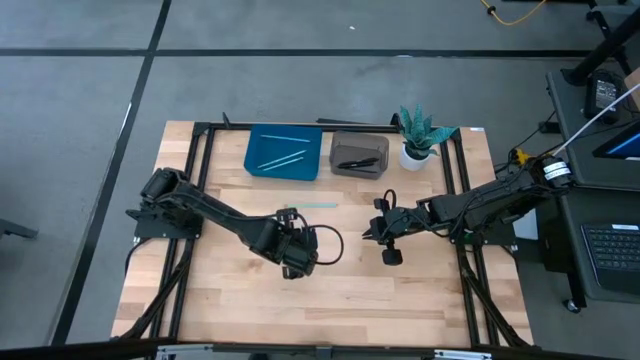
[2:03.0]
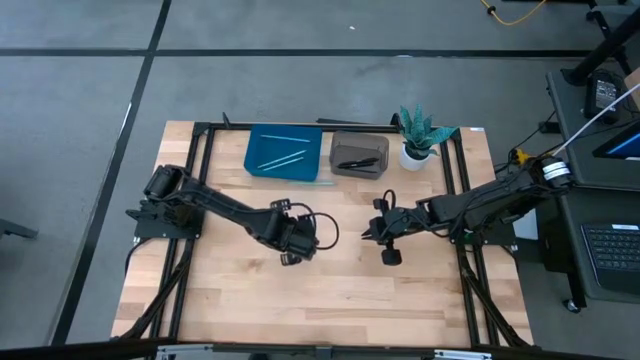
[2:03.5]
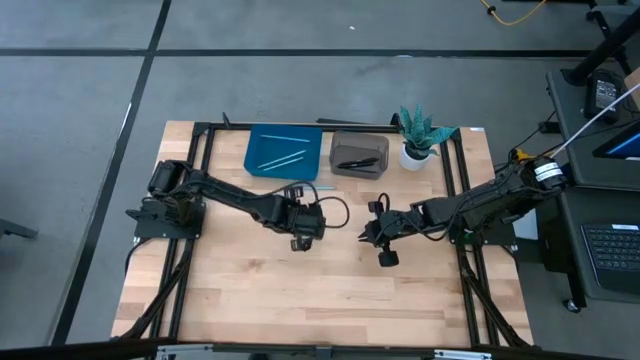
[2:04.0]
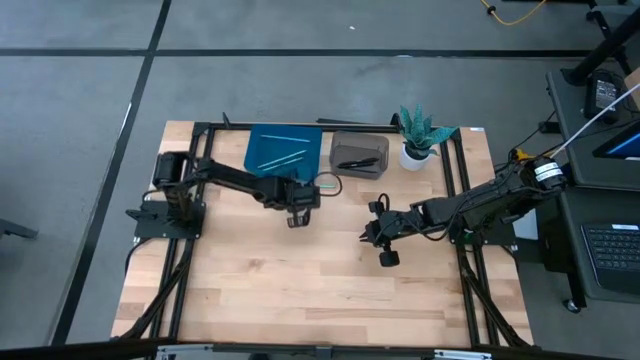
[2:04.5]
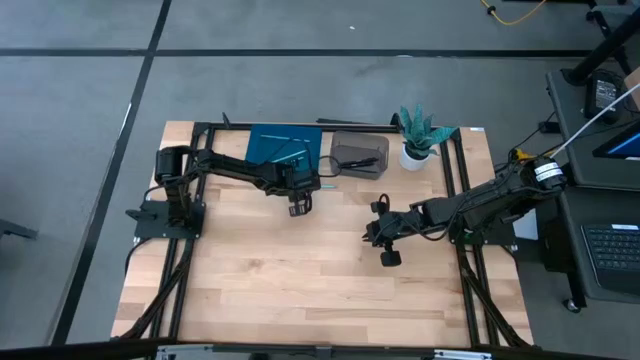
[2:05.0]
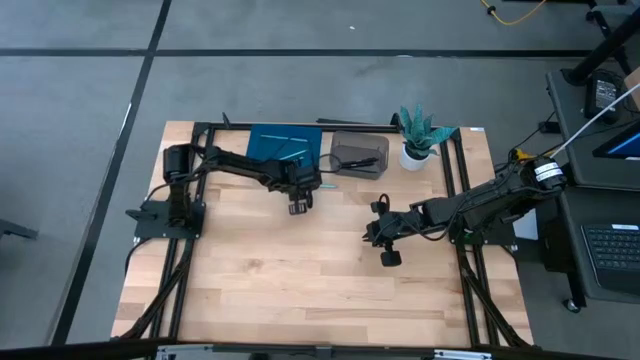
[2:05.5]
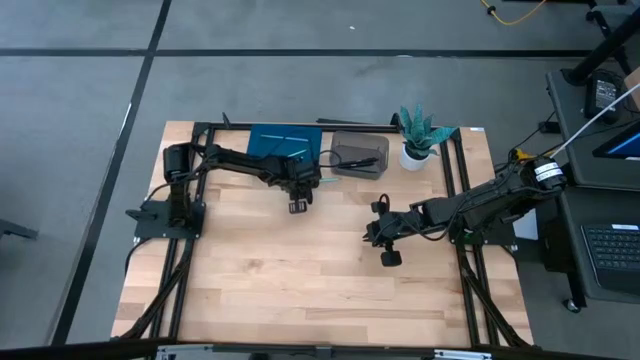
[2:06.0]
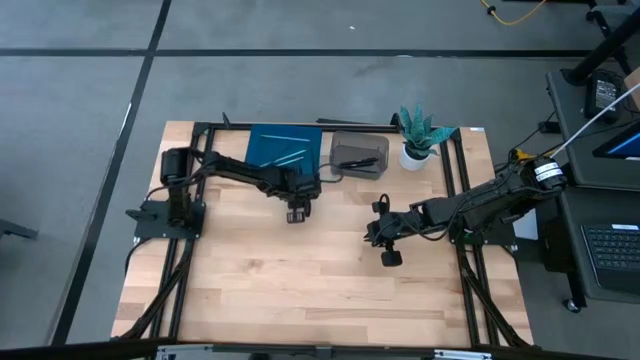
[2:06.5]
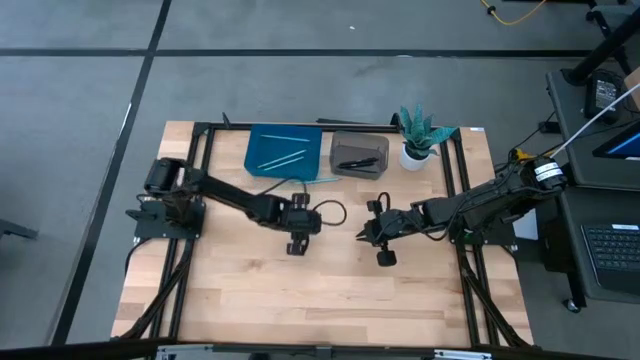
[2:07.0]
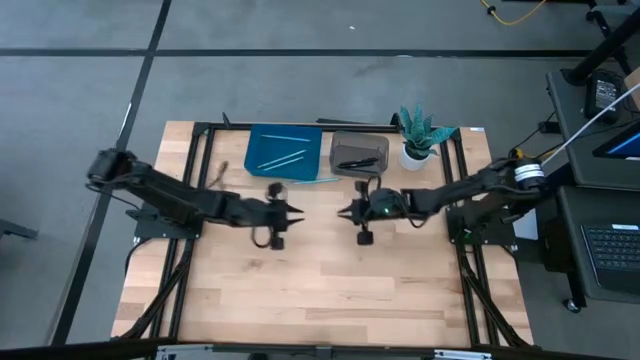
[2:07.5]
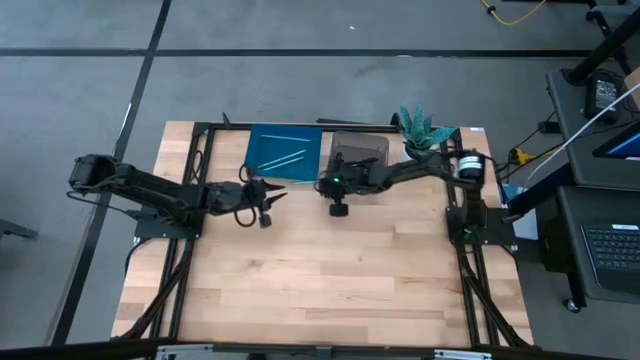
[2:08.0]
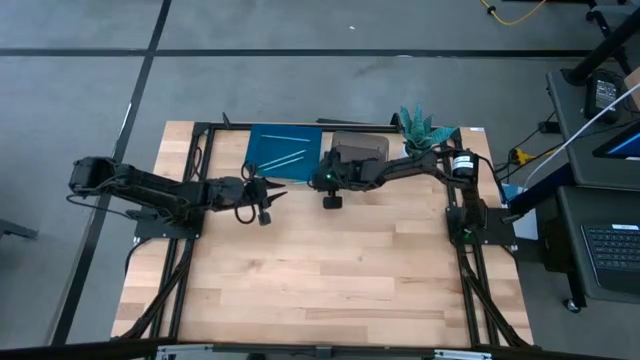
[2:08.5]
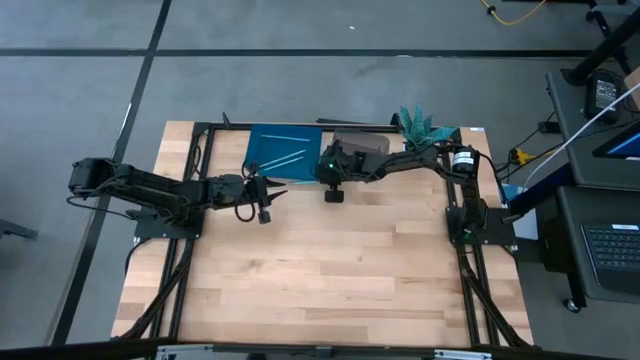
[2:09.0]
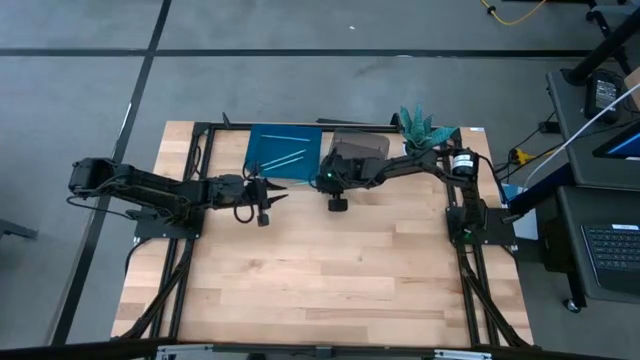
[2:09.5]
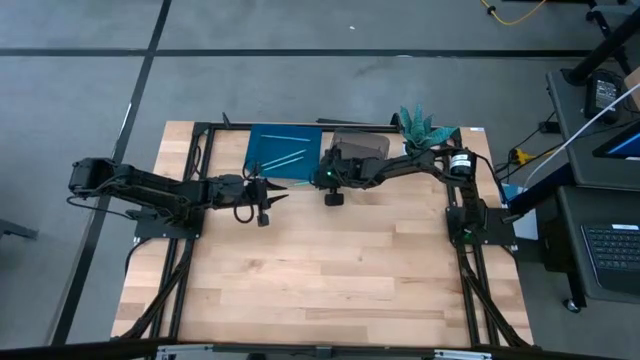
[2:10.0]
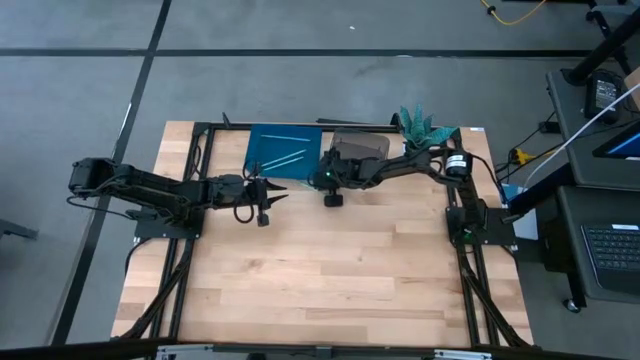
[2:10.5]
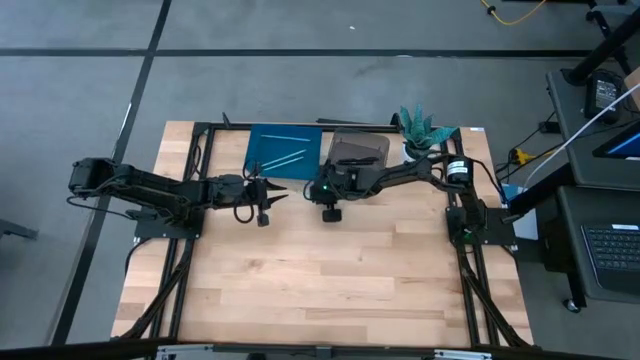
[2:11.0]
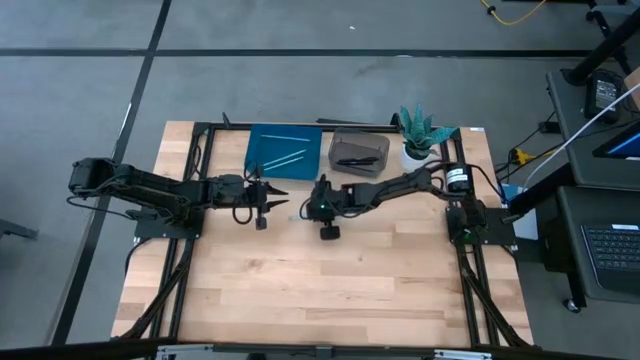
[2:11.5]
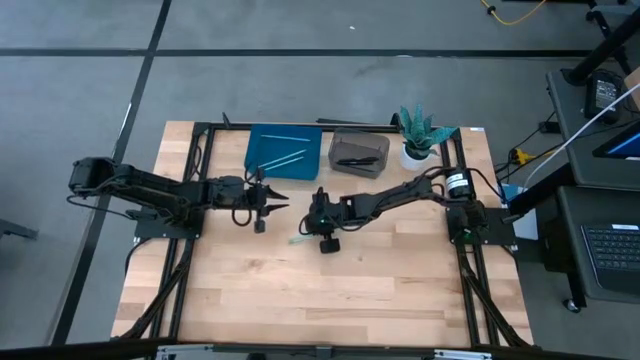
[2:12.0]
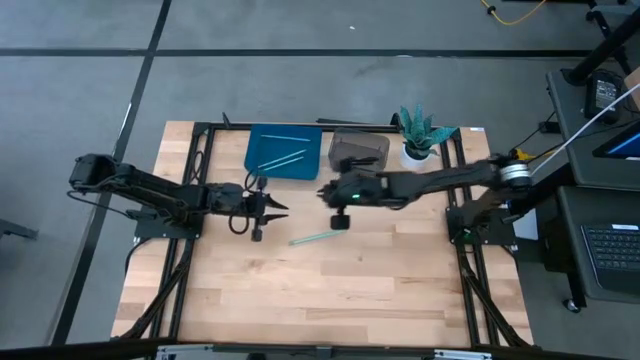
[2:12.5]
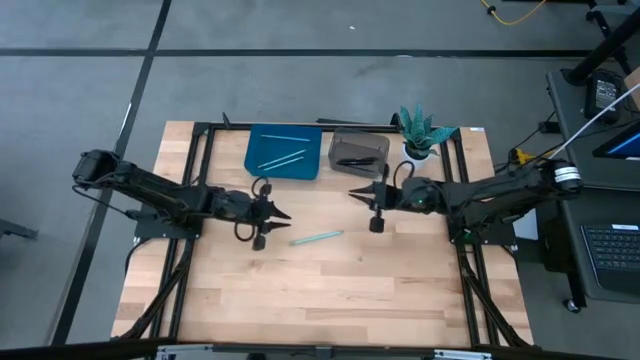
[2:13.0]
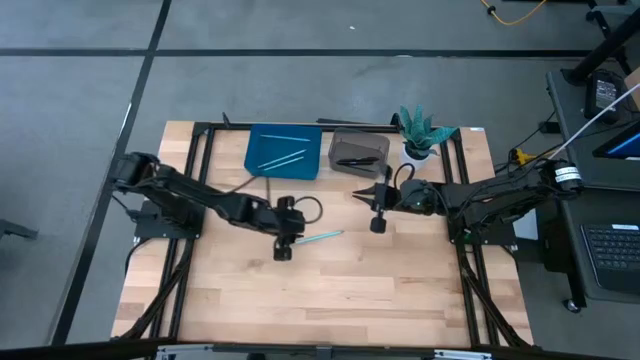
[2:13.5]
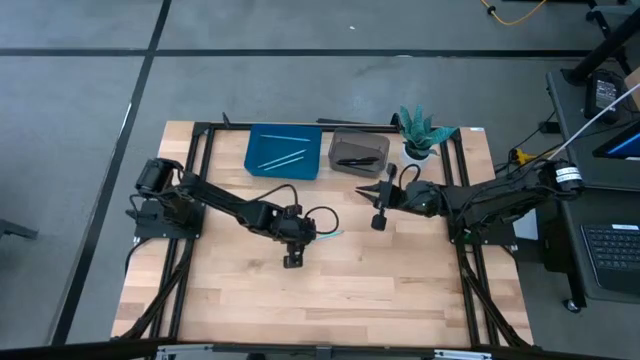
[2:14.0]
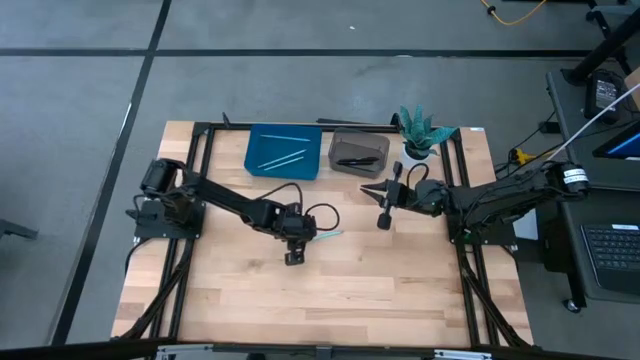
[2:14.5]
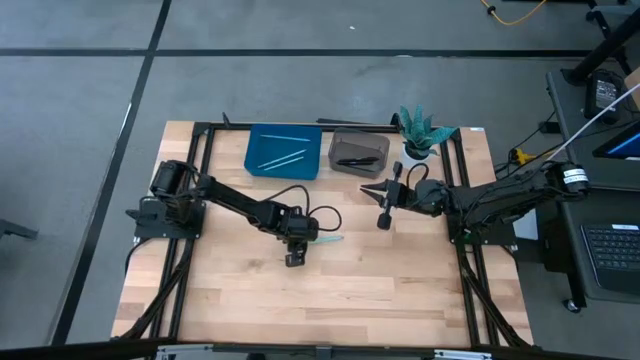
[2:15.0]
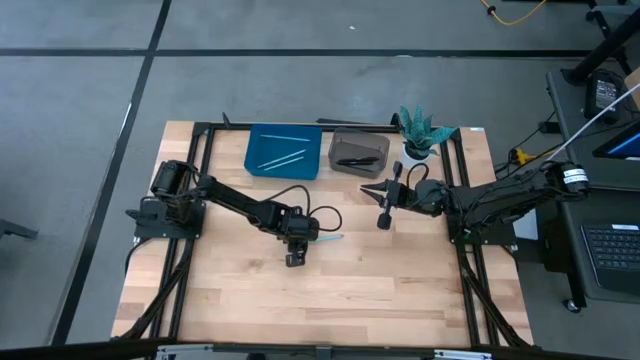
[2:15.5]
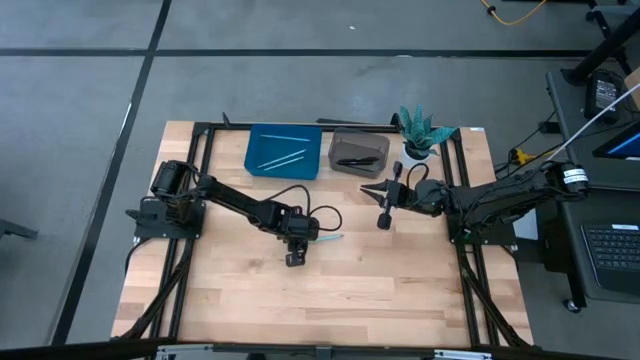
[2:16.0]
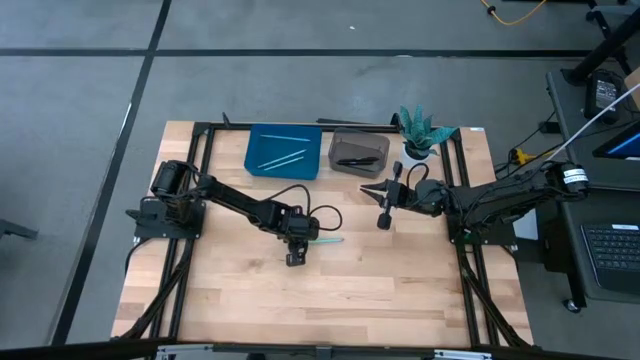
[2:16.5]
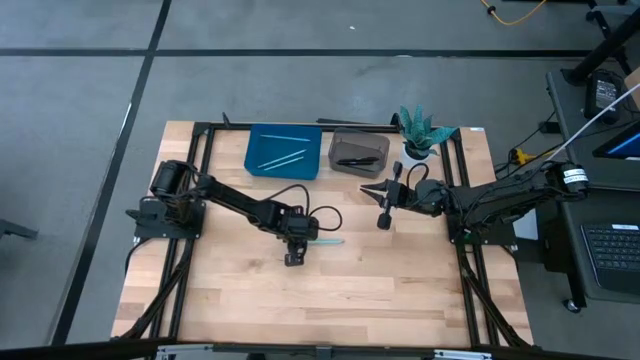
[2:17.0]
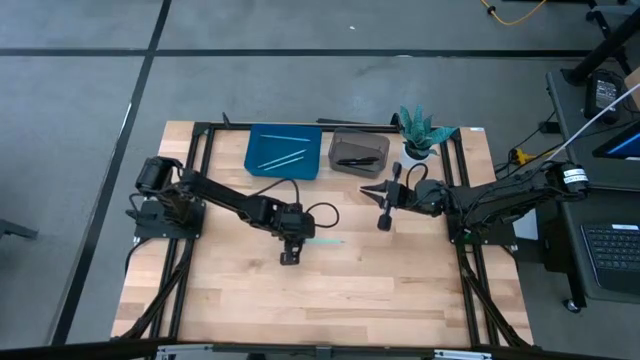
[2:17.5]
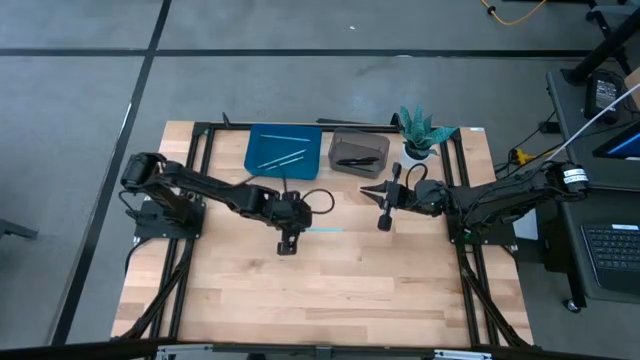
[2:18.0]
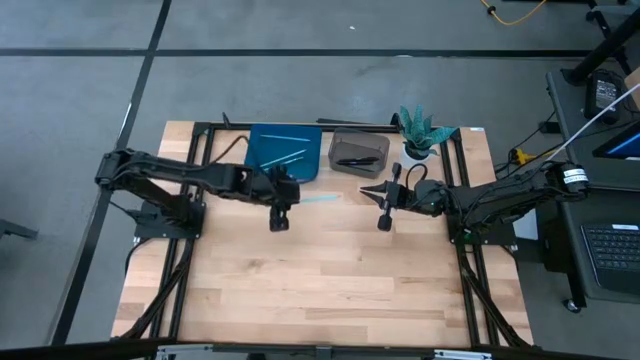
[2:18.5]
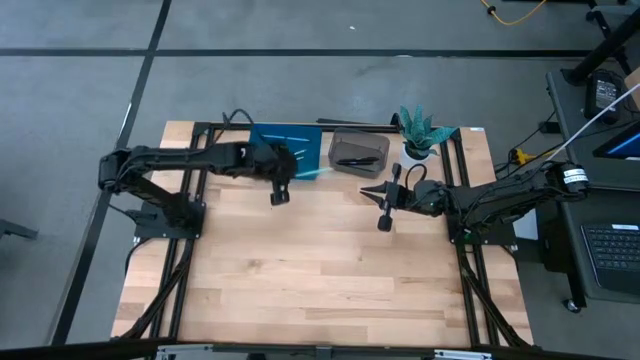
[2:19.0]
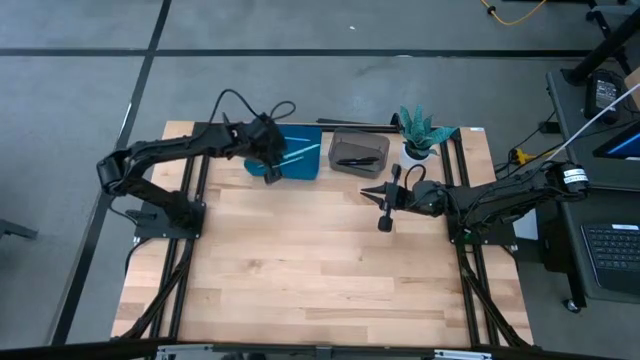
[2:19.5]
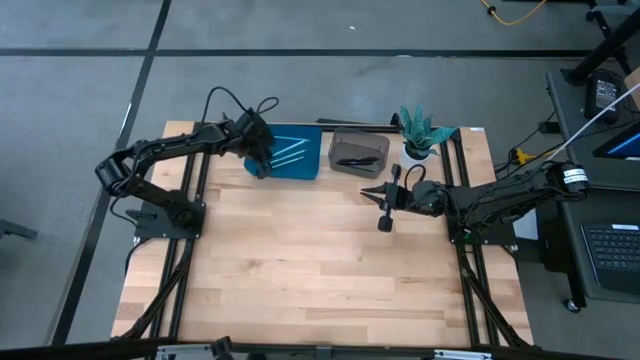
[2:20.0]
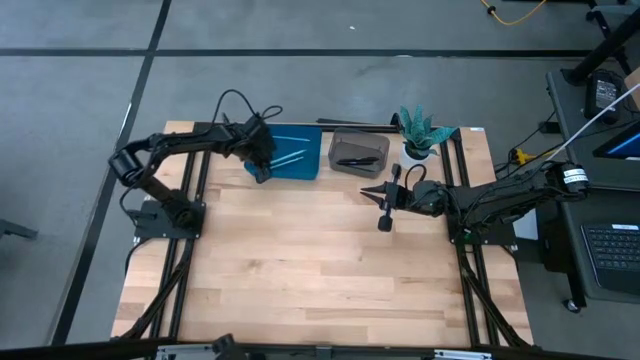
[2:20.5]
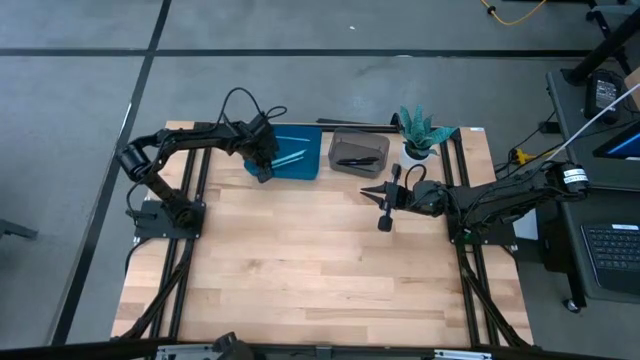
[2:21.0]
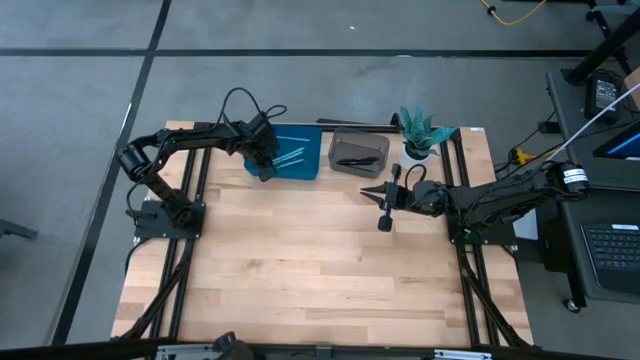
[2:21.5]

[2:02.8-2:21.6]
Task: Sort pens & pencils
Put the light green pencil into the blue bin

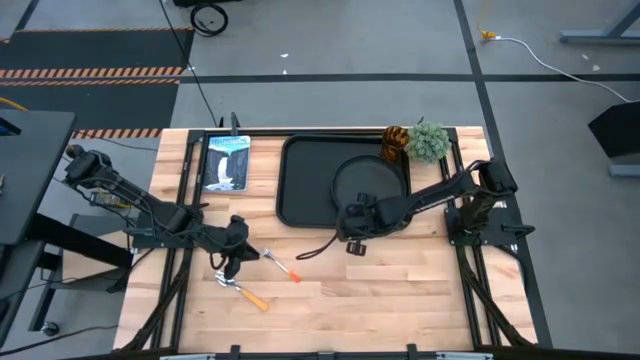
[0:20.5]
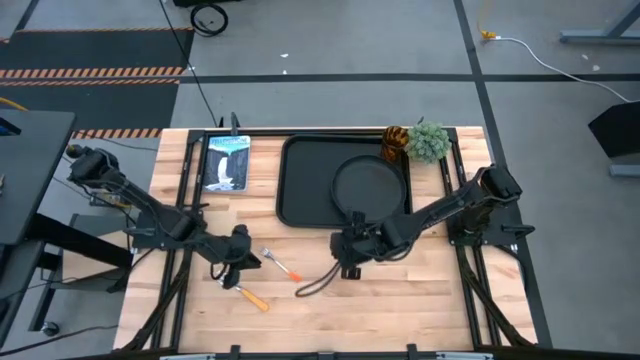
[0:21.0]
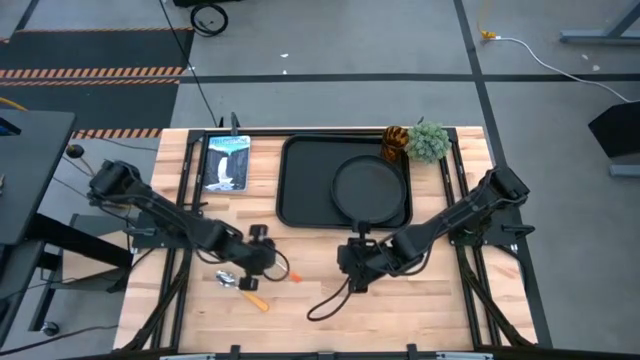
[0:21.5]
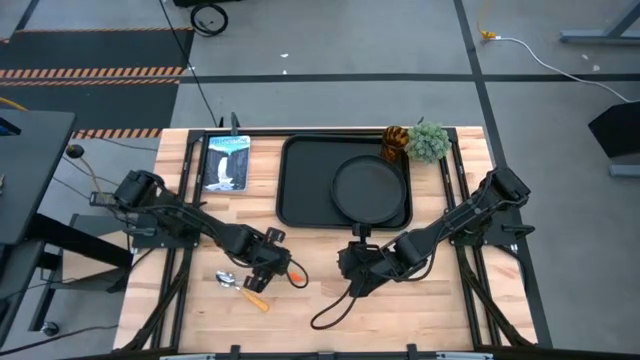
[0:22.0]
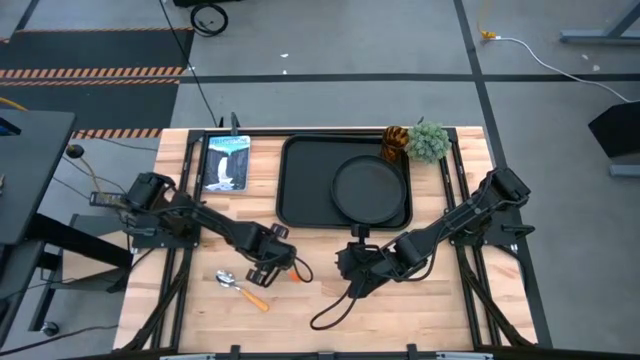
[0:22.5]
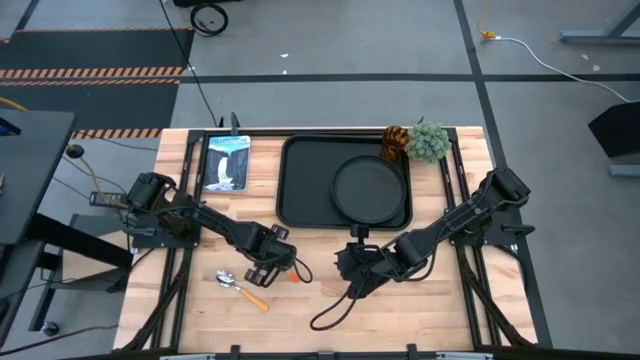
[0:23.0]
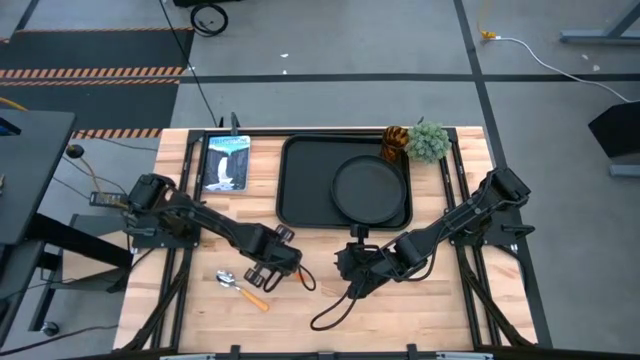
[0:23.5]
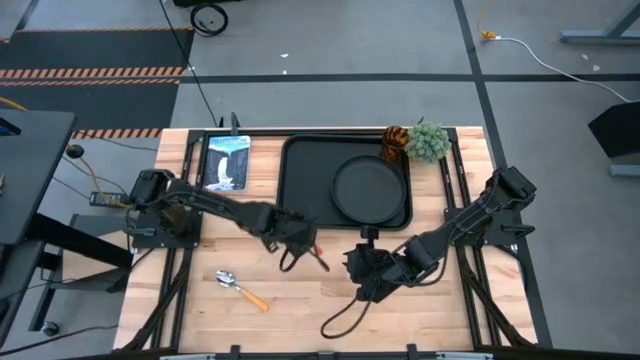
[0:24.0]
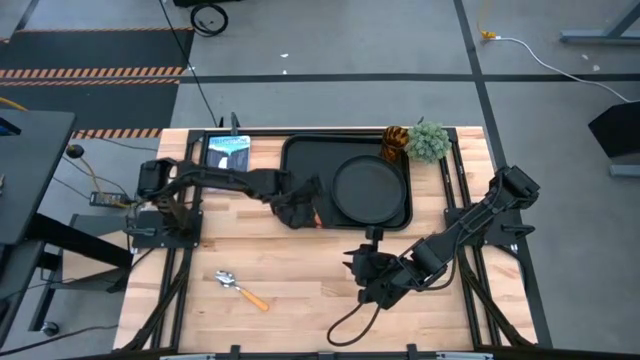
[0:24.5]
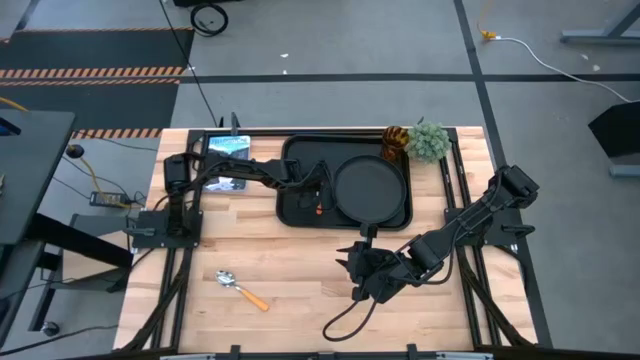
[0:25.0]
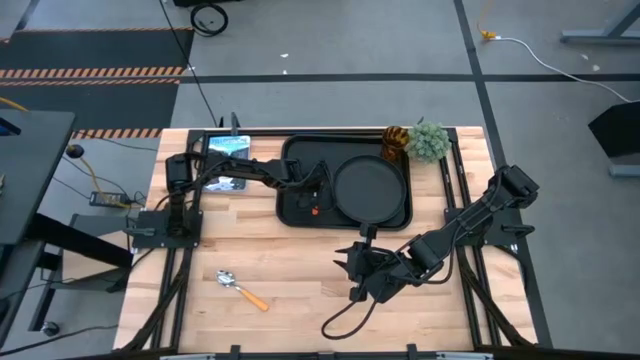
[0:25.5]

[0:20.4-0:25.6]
Task: Pick and place plate/cup/fork/spoon on tray
Put the orange fork on the black serving tray to the left of the black plate
